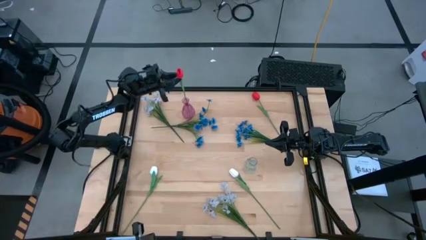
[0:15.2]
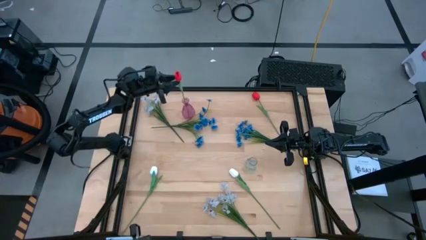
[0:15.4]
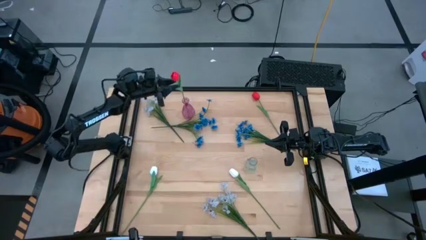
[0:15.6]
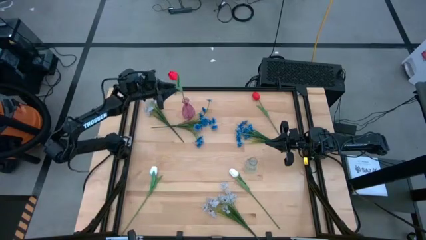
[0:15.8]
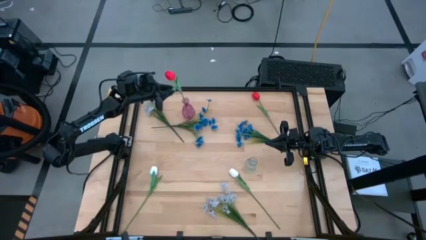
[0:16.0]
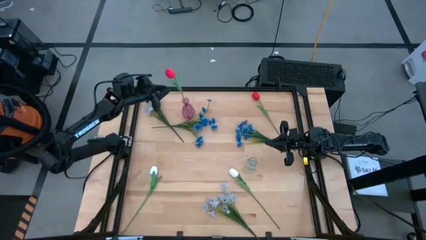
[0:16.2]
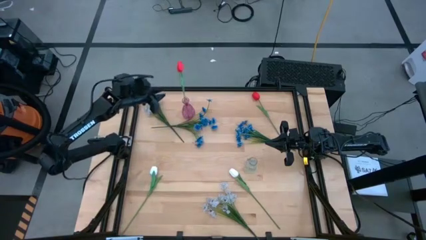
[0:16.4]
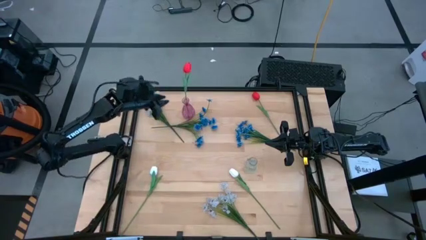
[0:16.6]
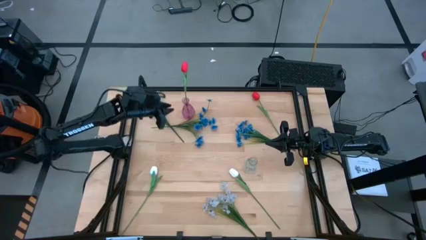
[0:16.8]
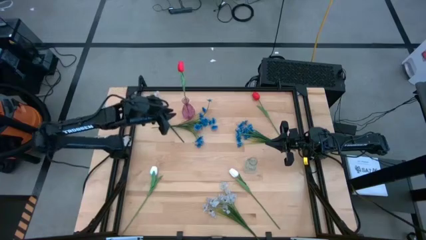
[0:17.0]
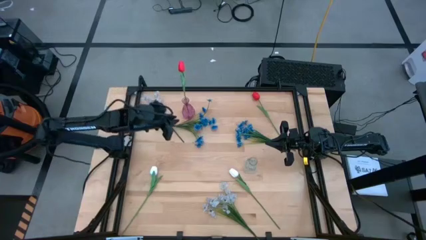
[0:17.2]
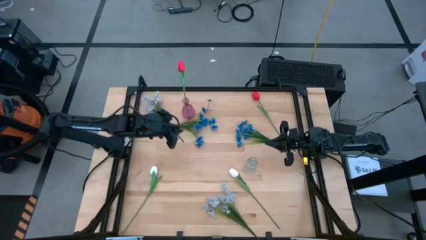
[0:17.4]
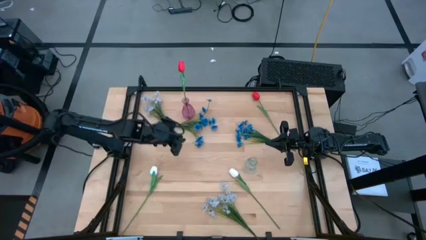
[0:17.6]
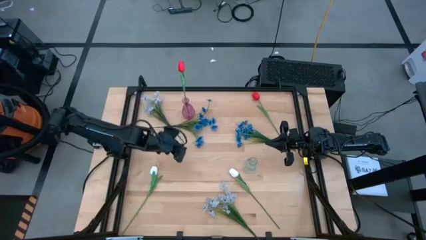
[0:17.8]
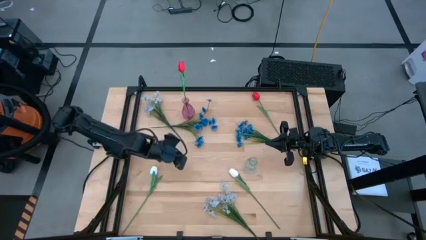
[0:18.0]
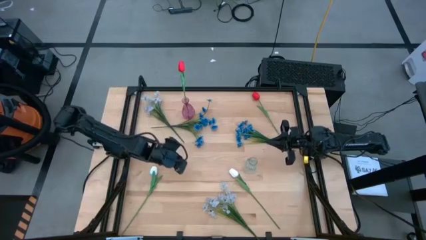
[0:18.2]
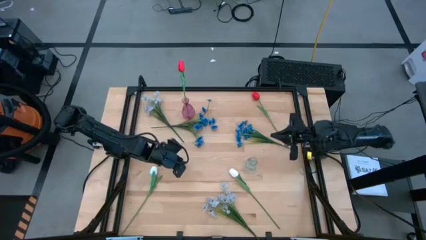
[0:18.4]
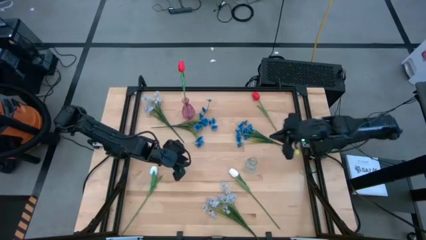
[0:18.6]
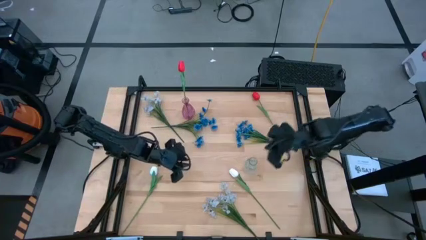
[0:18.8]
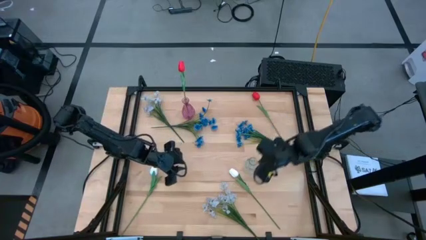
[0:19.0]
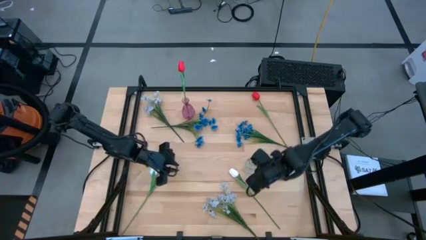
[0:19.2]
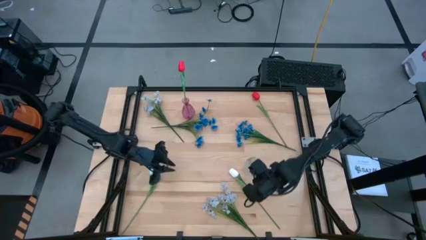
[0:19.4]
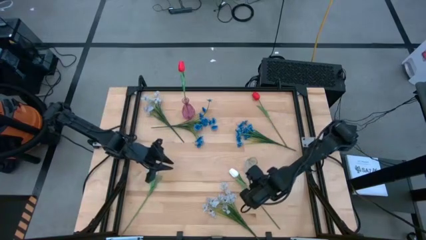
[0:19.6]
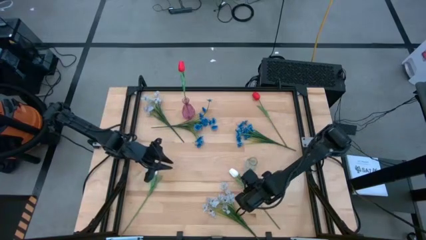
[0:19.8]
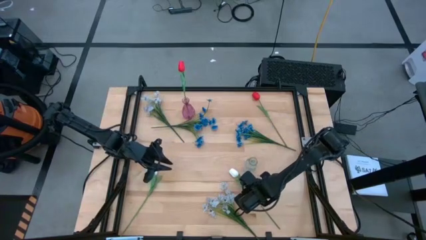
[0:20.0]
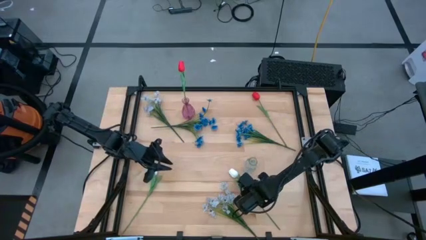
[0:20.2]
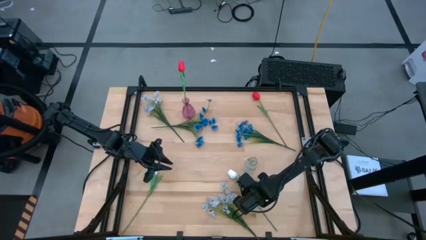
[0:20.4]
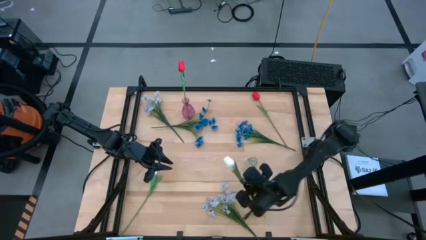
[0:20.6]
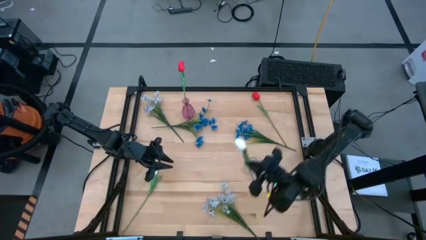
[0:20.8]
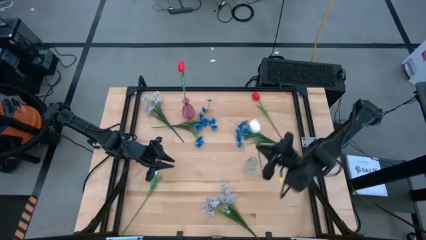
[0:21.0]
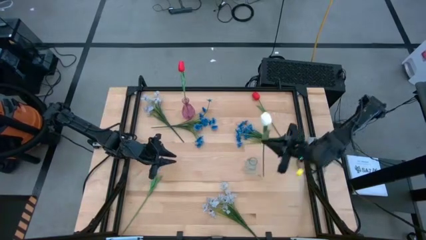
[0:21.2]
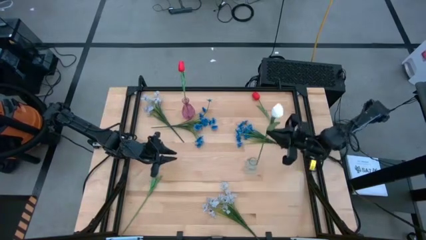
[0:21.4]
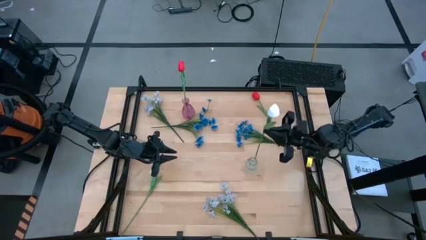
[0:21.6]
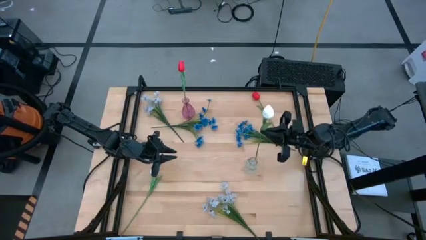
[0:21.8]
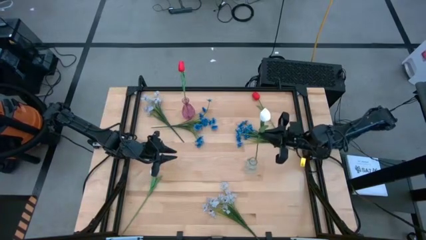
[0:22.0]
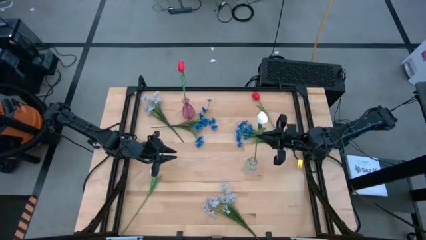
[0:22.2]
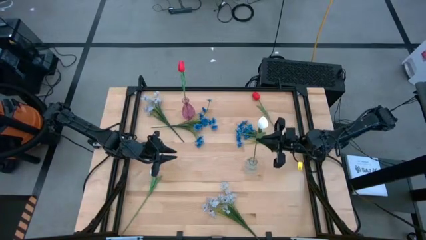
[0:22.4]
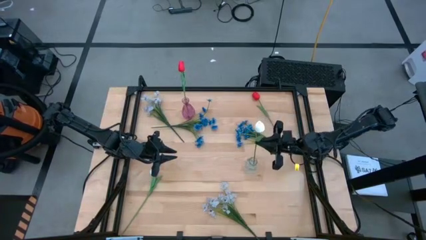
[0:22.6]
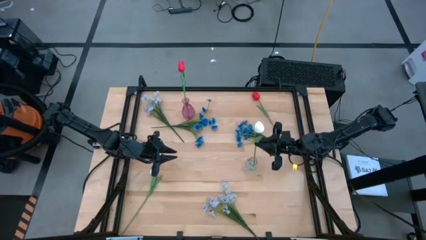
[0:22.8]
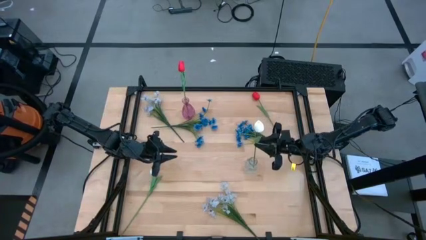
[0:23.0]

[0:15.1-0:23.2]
Task: Sort flowers into vase by color
Put the right white flower into the transparent vase

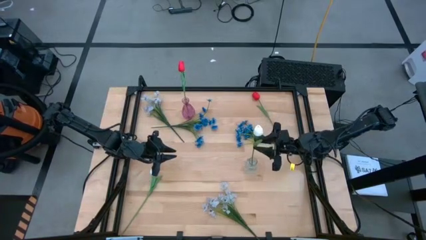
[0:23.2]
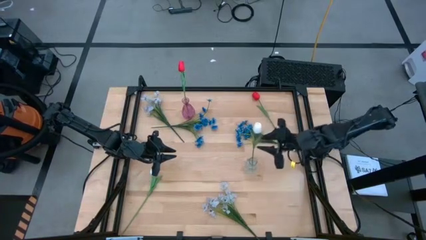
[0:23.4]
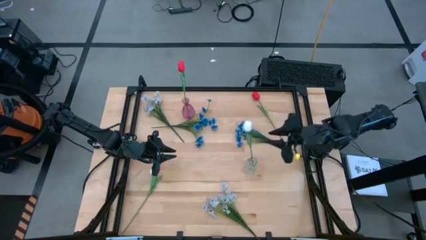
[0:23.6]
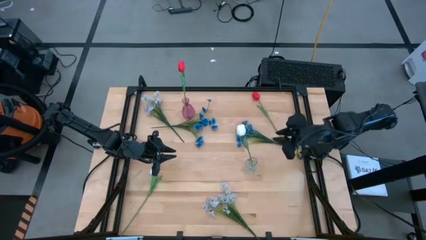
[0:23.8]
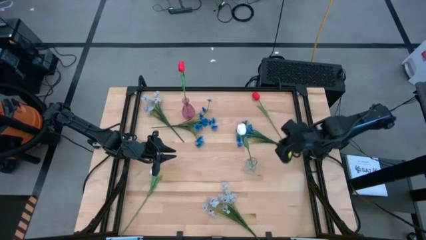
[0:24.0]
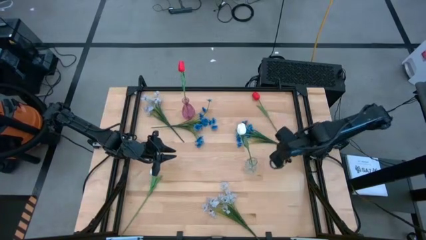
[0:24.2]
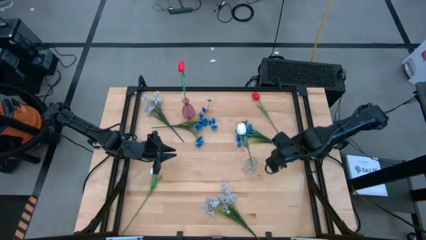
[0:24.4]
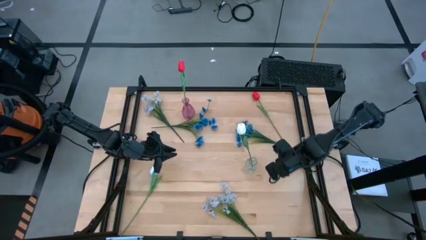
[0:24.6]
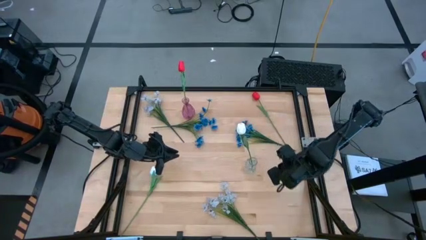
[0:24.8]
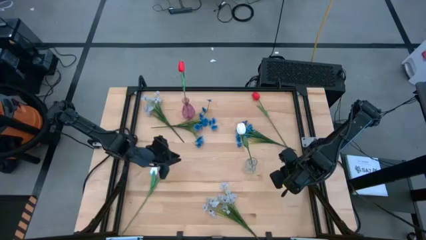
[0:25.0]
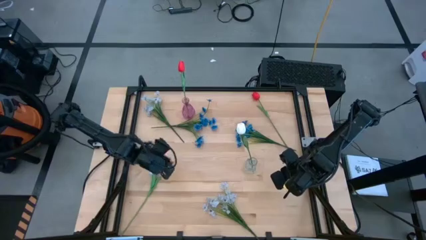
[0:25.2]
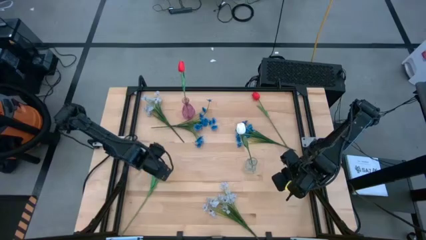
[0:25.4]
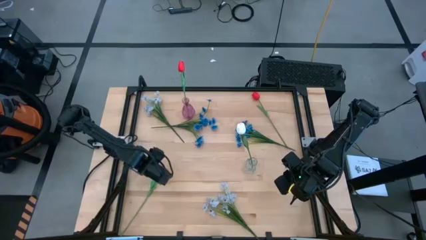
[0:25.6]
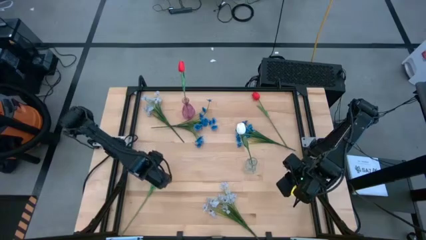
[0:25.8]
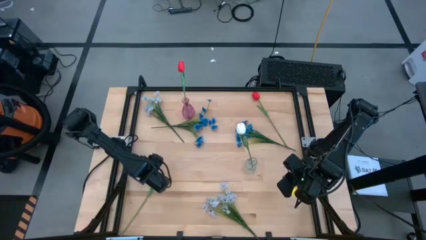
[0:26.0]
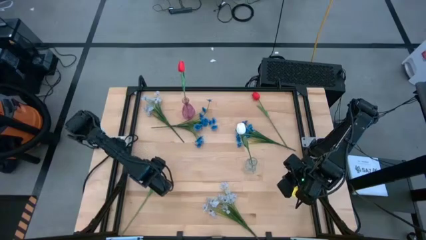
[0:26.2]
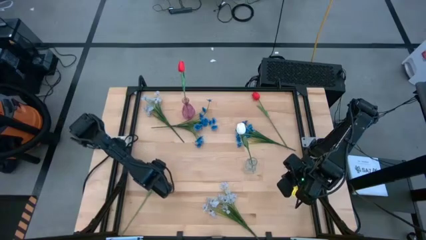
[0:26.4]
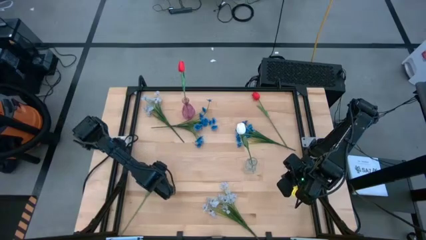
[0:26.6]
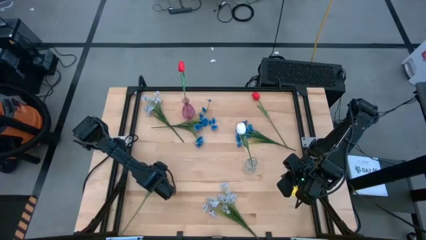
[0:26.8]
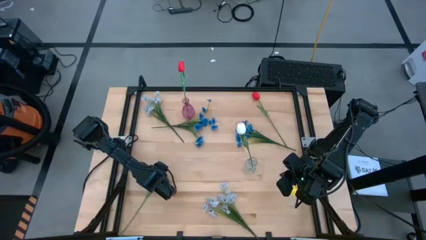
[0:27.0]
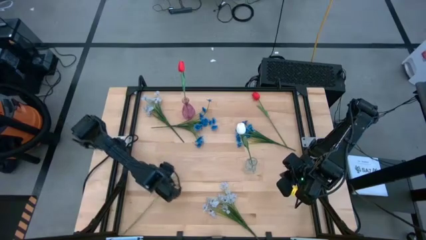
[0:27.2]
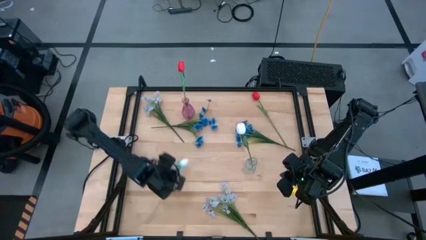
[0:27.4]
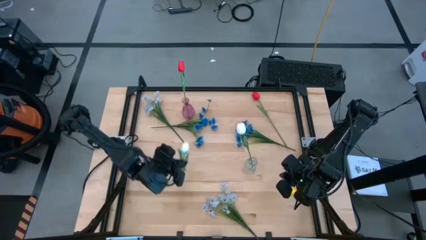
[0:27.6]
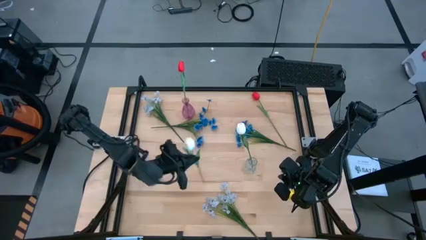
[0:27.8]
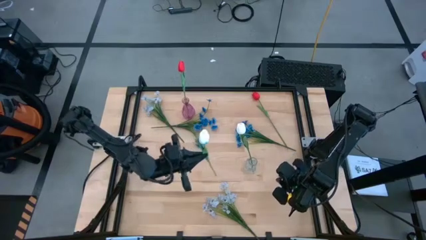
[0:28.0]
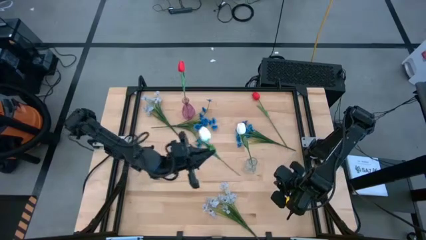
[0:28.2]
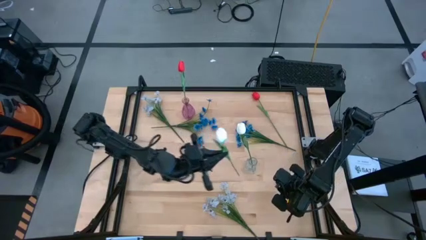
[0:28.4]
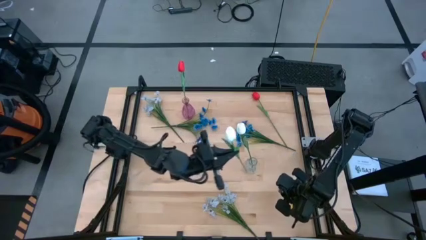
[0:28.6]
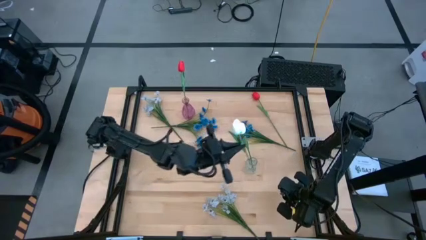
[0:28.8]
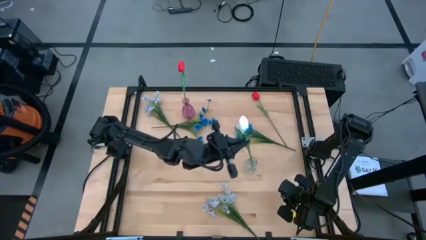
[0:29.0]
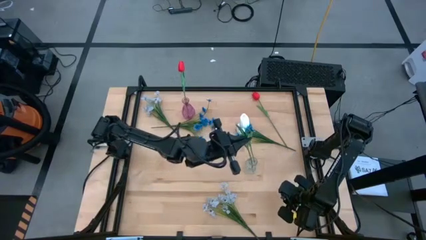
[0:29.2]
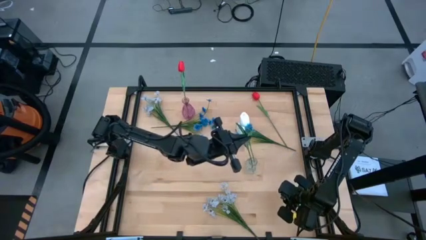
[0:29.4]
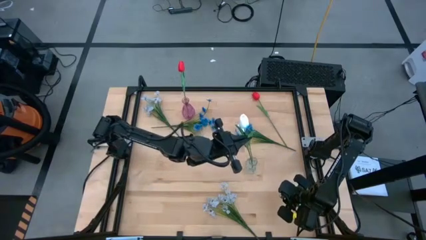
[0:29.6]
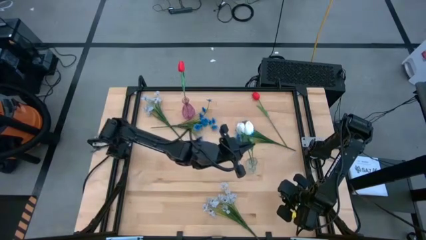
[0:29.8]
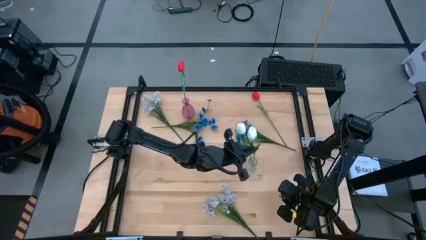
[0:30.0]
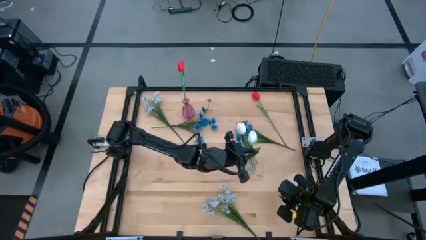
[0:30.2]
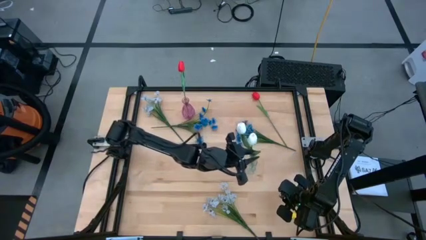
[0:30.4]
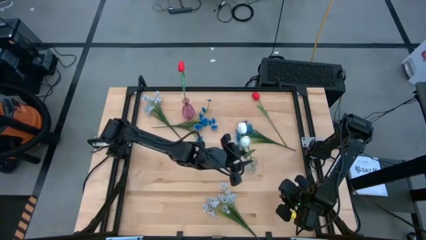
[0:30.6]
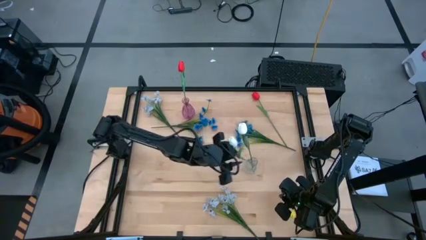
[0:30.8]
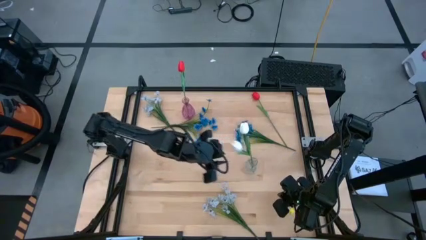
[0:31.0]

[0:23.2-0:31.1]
Put the white flower into the transparent vase
